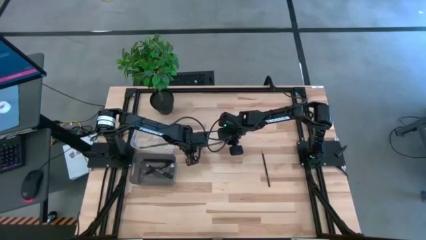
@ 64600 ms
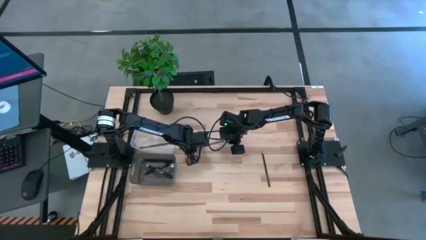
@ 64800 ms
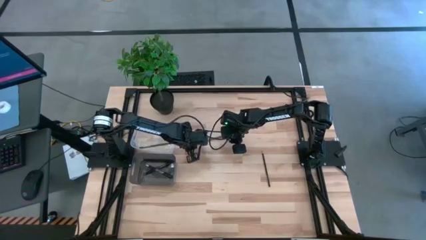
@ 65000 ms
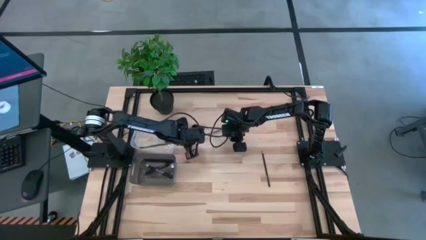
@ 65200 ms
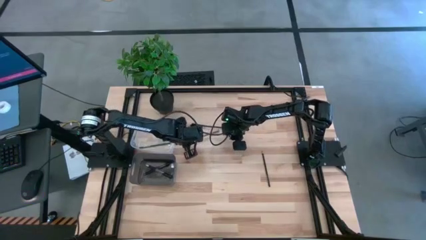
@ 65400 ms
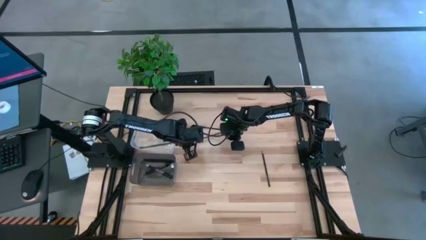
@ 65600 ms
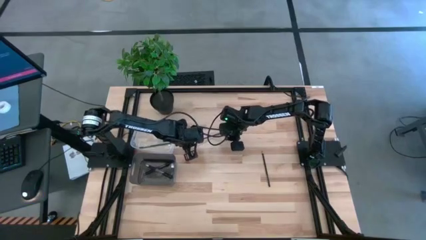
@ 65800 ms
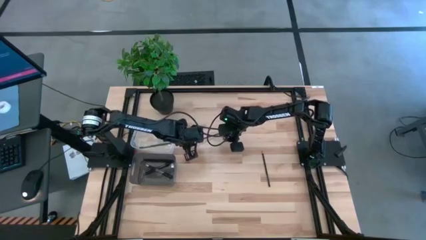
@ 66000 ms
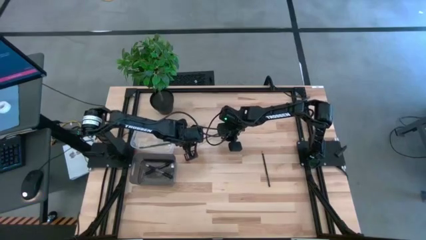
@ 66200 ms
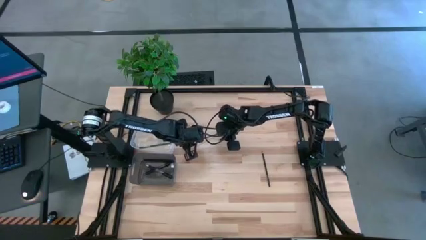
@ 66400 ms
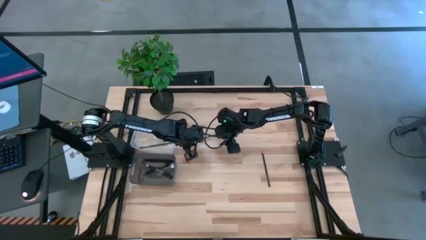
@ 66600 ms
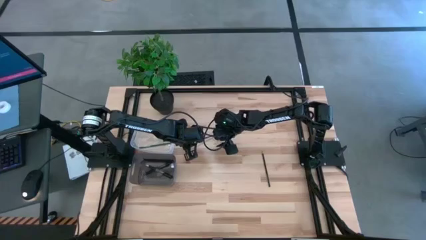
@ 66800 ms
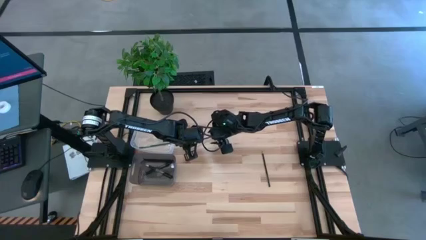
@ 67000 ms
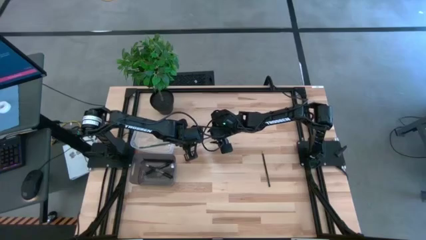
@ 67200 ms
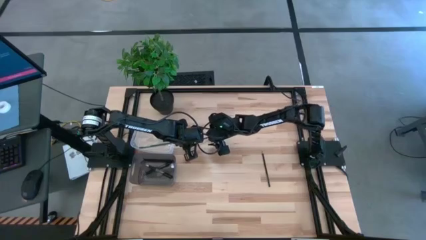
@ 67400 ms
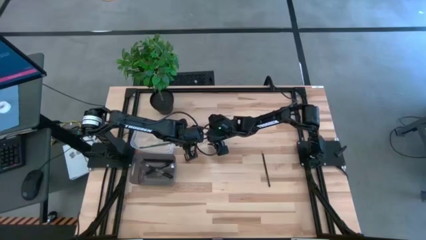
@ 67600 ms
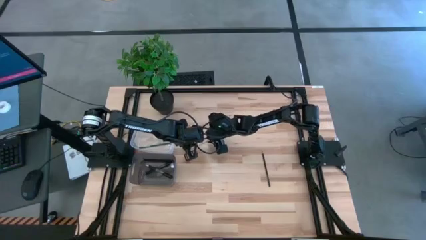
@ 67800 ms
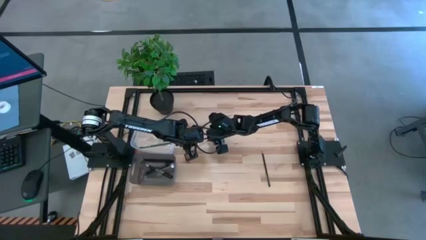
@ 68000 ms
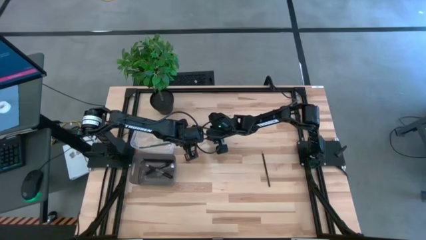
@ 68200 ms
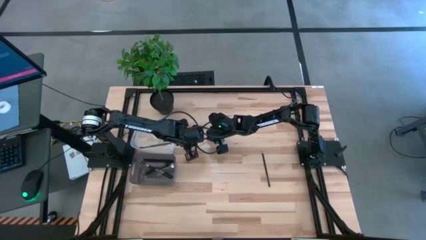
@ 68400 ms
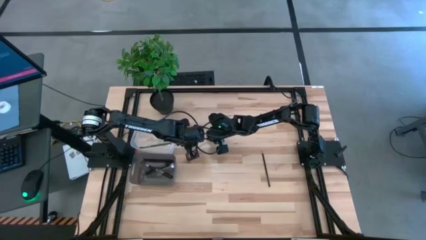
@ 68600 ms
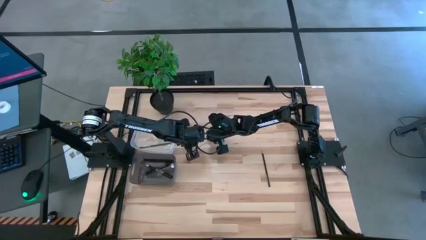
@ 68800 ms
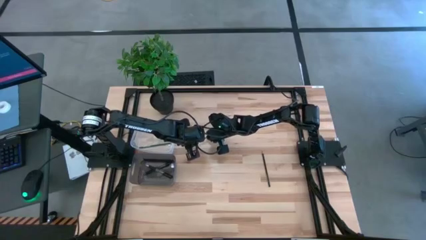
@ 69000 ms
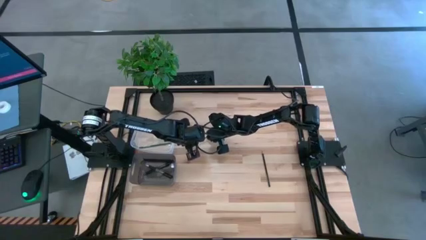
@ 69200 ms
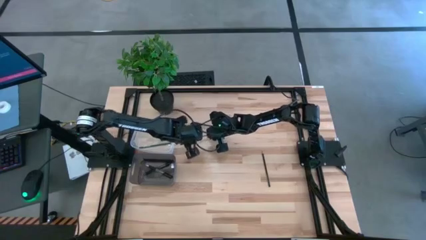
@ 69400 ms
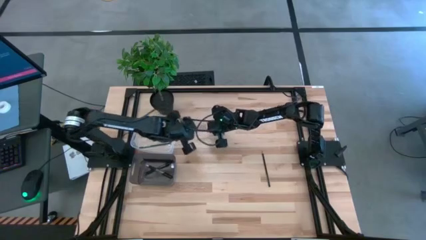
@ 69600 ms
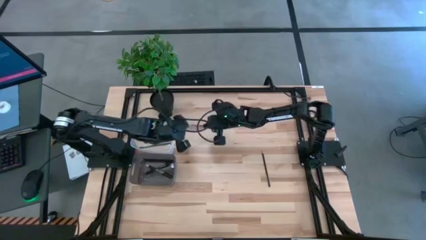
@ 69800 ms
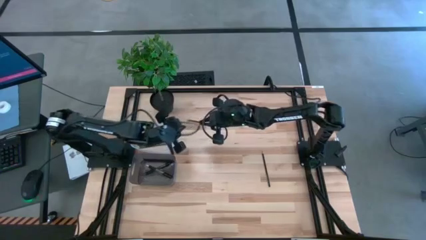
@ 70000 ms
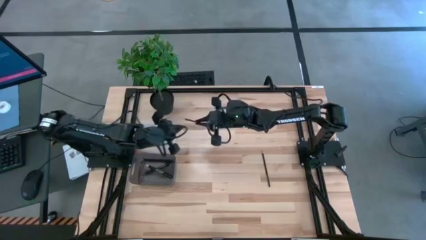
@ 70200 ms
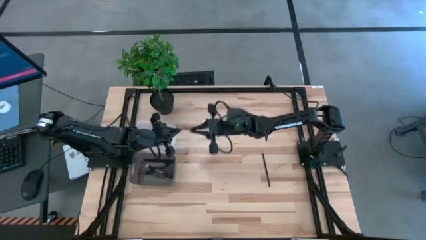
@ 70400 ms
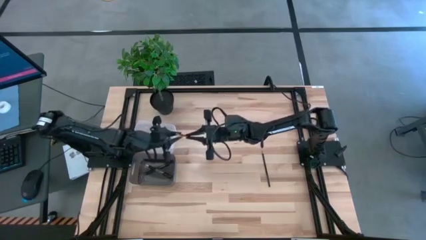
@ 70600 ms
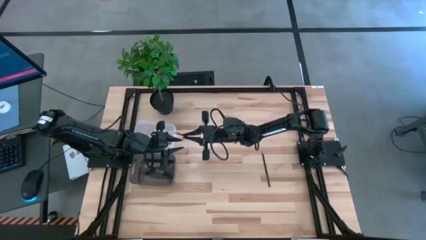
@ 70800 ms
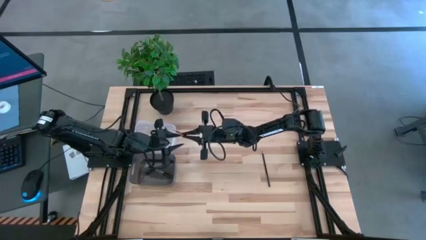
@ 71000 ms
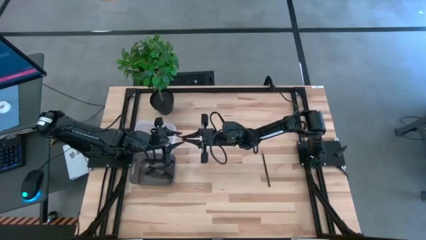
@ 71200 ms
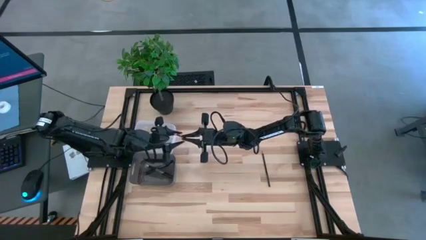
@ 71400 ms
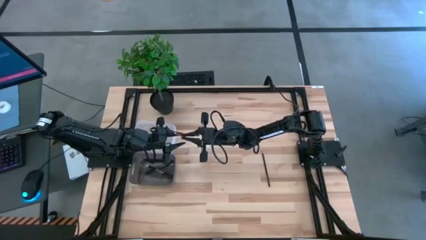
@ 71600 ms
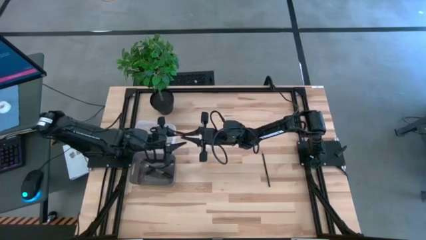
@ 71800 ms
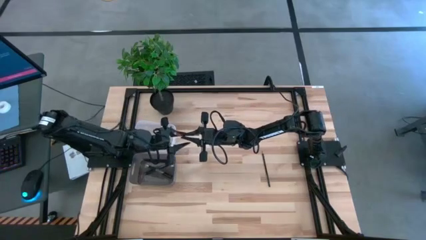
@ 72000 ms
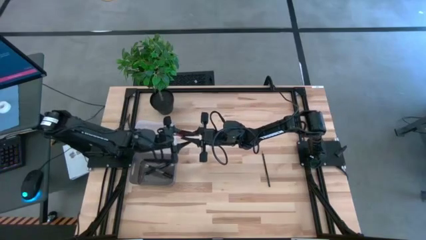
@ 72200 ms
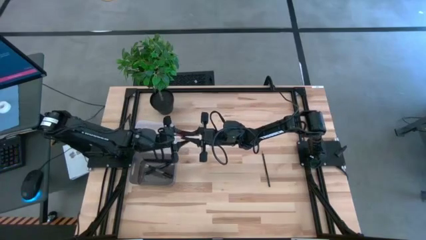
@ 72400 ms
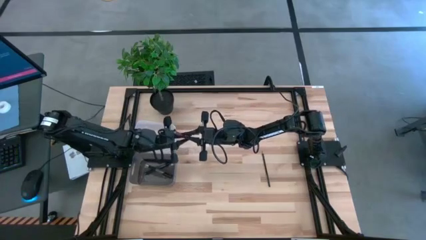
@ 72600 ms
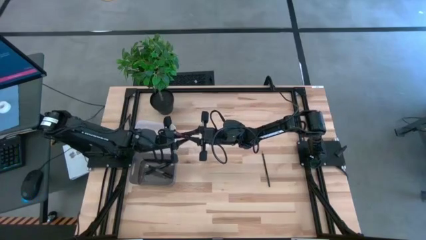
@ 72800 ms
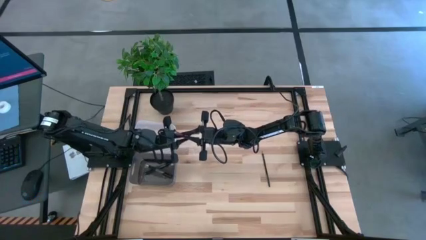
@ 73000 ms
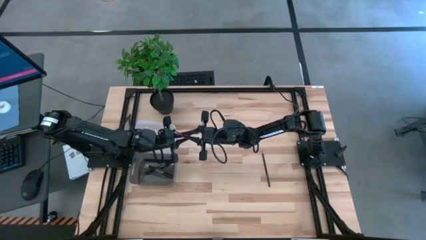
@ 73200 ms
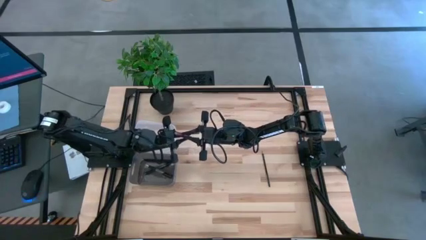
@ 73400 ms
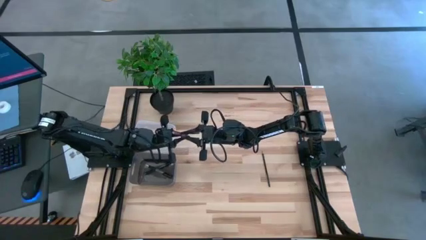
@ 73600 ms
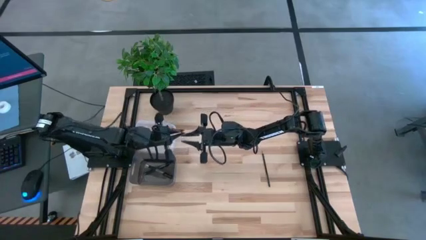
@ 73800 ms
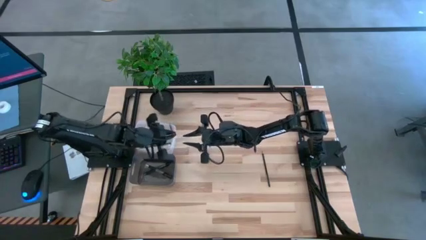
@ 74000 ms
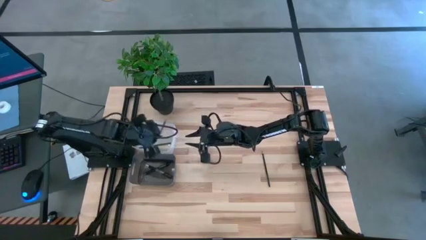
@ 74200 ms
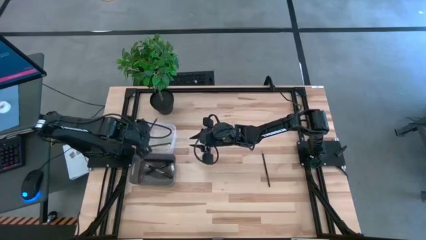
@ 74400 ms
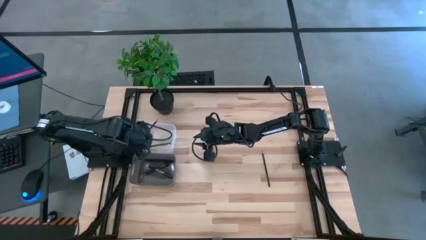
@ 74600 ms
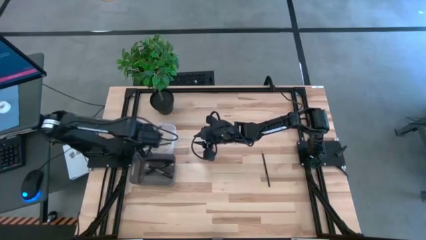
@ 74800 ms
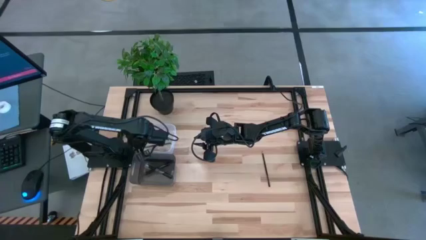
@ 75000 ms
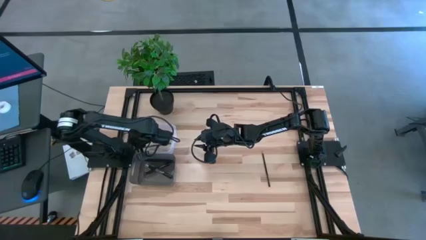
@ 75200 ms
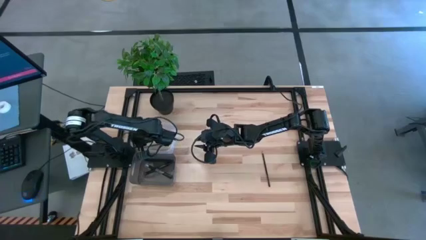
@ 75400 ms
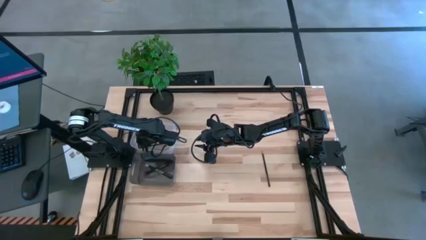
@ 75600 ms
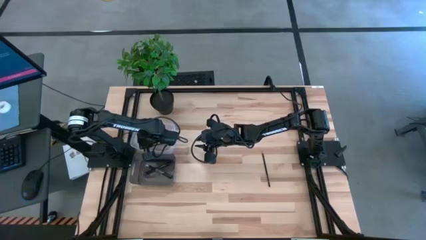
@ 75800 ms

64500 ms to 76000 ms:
Task: Sort pens & pencils
Put the red pencil into the transparent bin

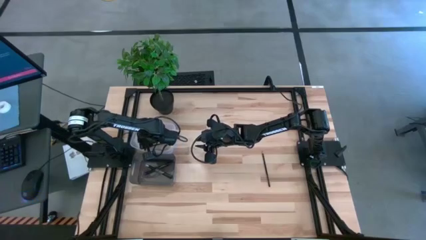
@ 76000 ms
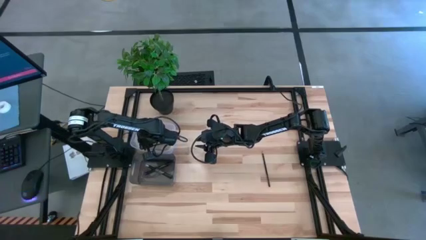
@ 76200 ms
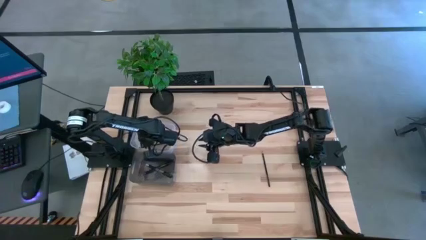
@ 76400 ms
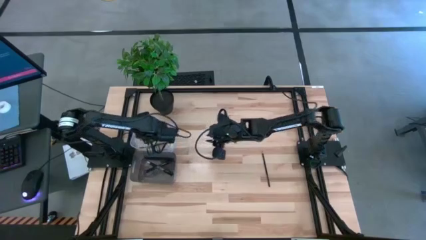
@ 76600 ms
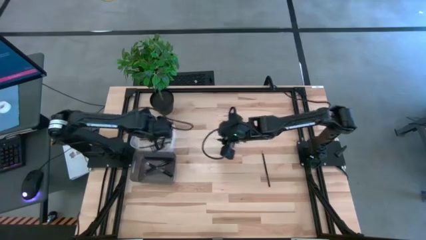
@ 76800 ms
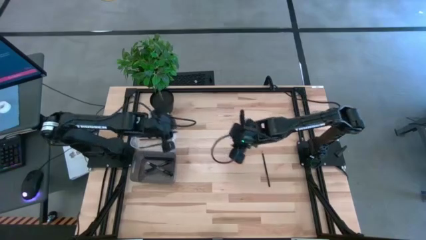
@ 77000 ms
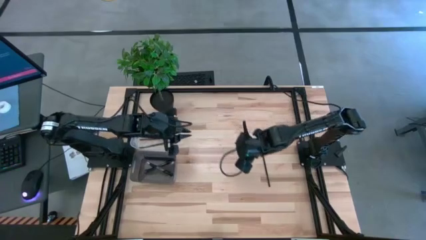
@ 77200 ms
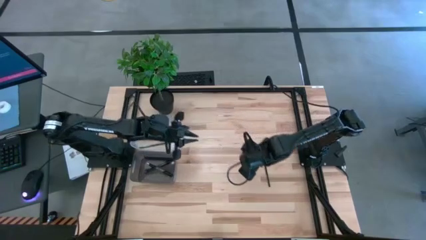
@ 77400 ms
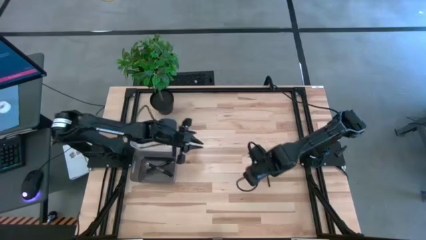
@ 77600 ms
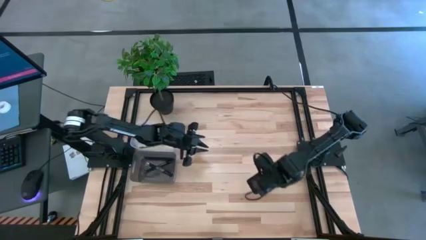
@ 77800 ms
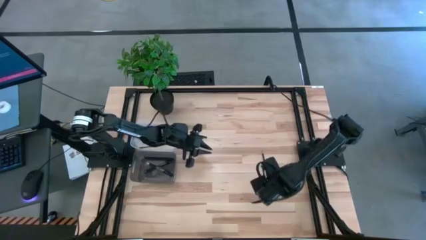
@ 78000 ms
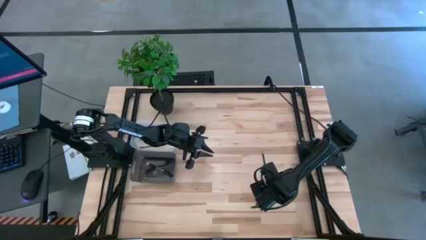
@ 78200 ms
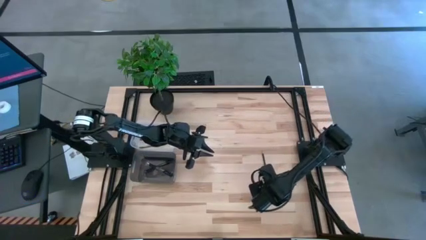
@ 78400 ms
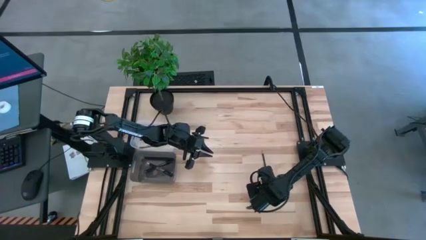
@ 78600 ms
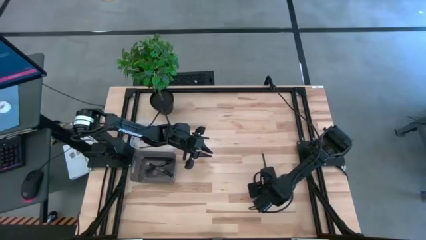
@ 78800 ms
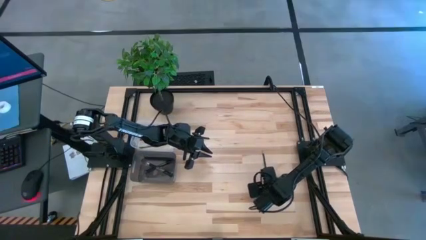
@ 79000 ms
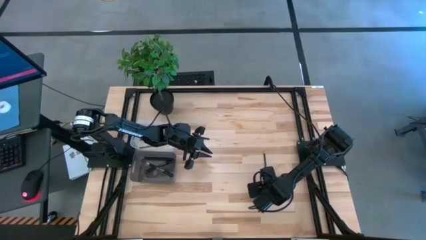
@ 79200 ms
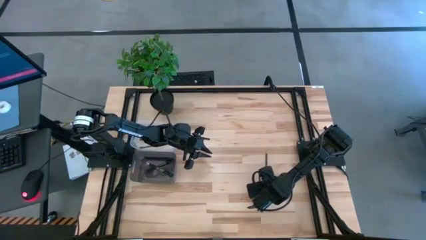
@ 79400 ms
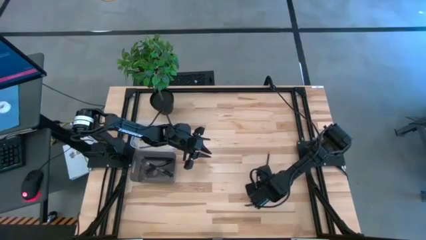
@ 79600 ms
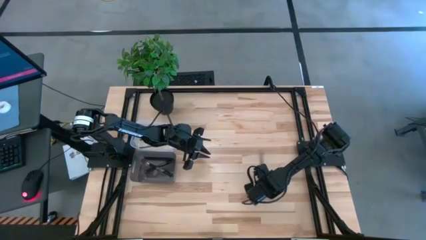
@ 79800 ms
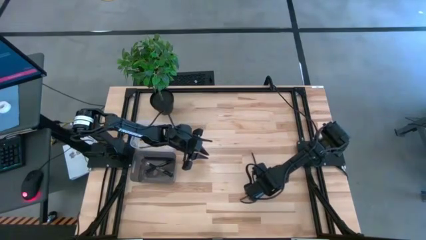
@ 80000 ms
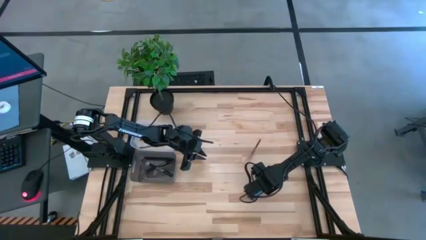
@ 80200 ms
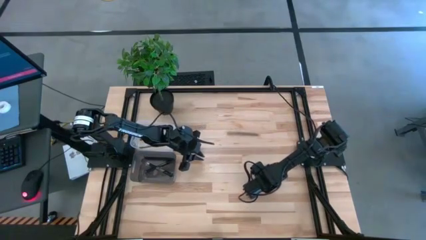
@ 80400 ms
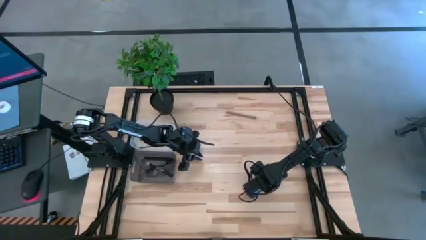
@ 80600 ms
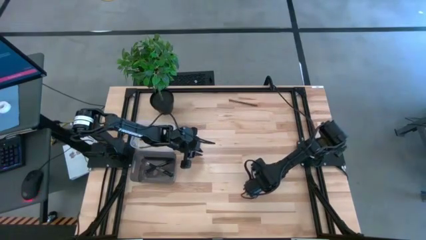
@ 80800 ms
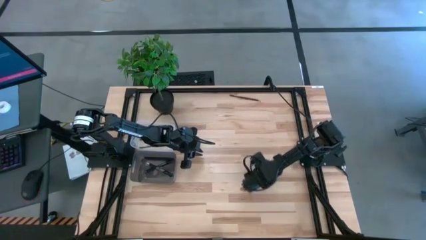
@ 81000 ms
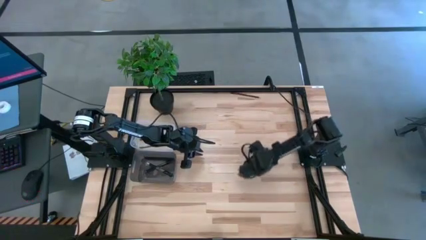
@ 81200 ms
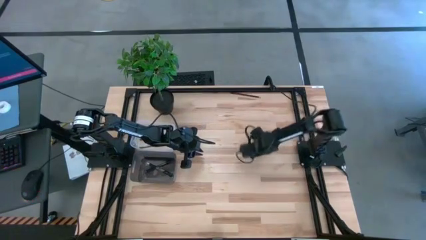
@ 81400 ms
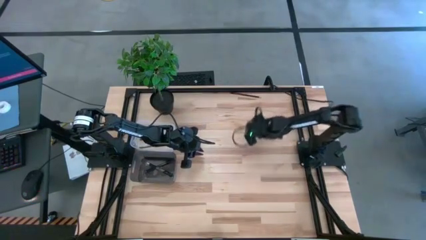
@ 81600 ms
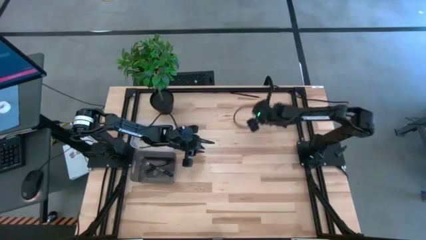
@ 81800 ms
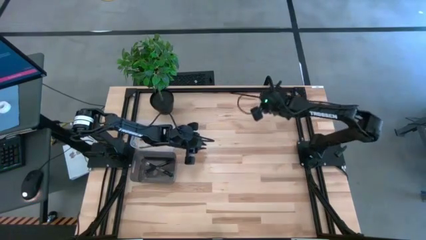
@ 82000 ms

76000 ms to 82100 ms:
Put the black pencil into the transparent bin
